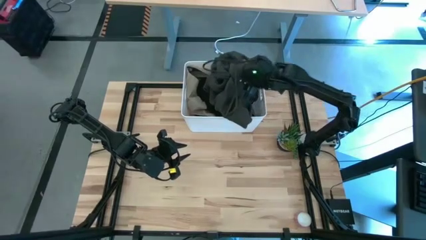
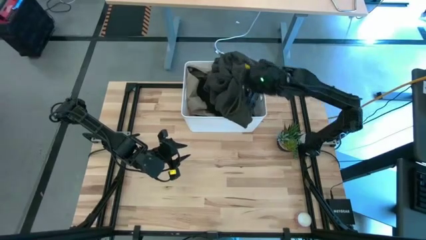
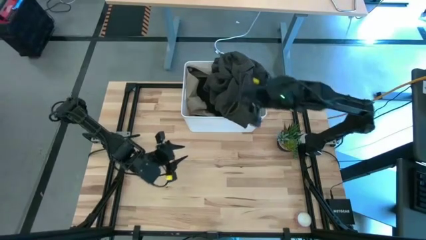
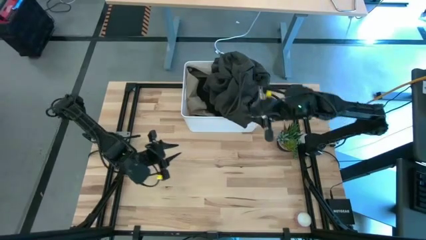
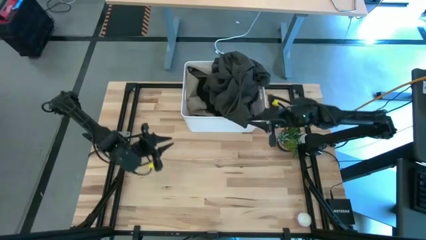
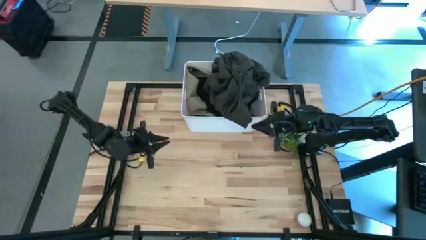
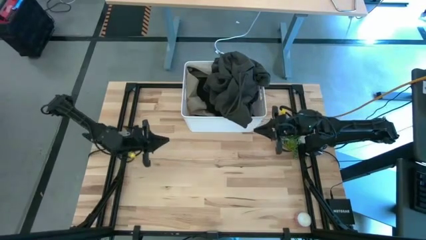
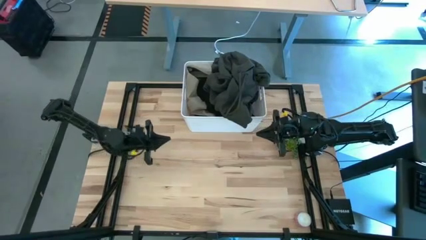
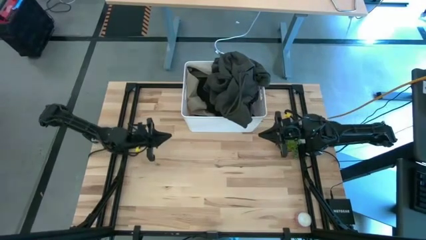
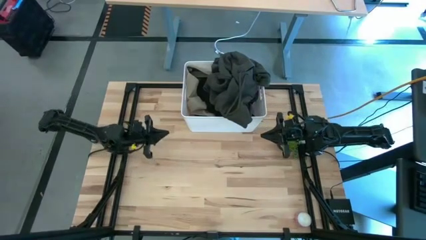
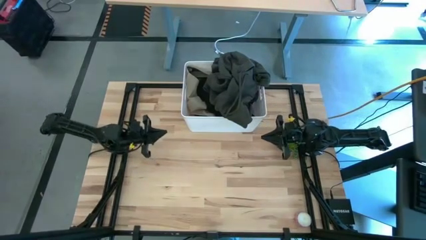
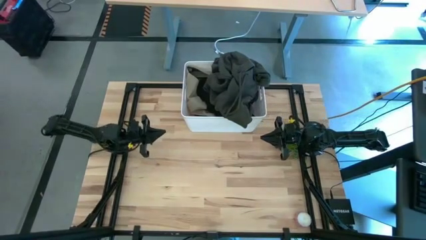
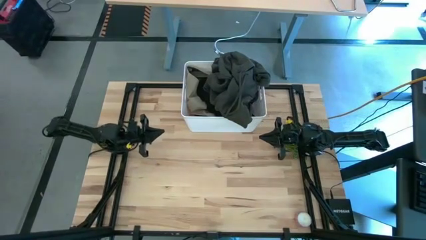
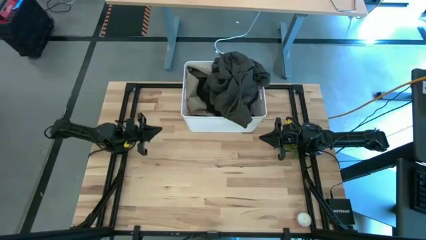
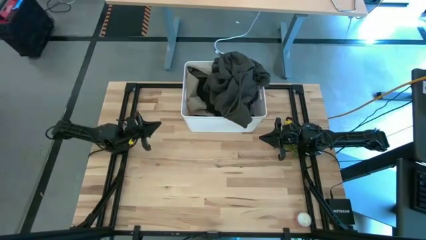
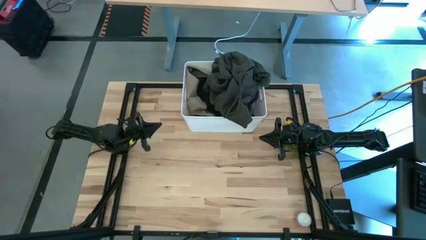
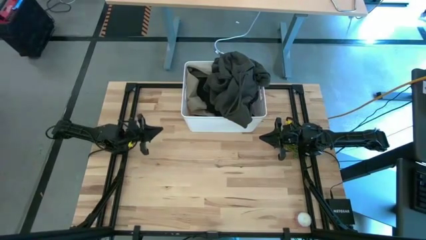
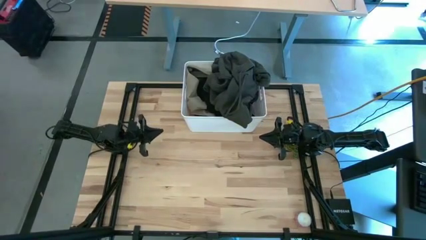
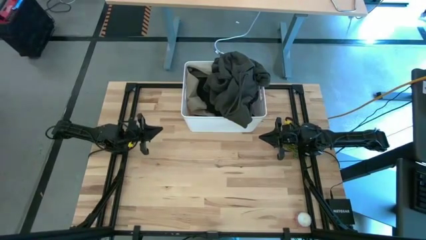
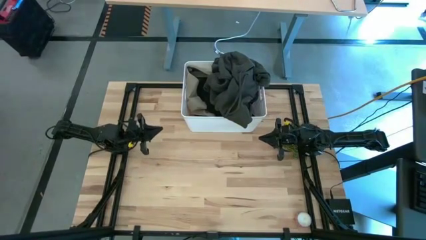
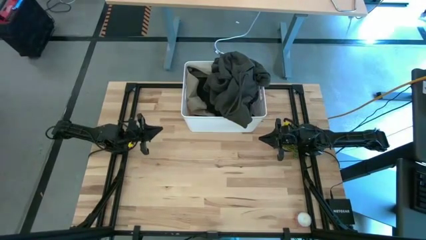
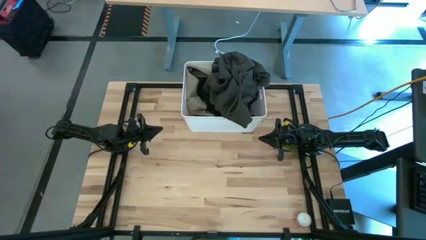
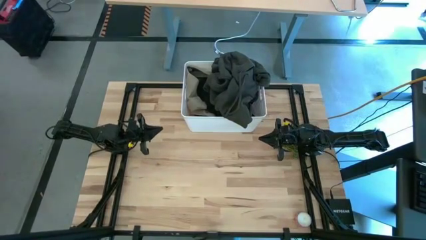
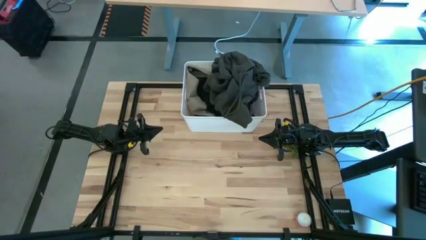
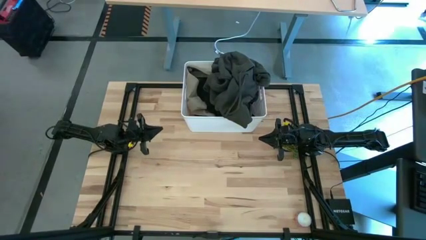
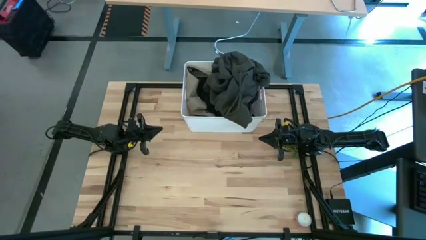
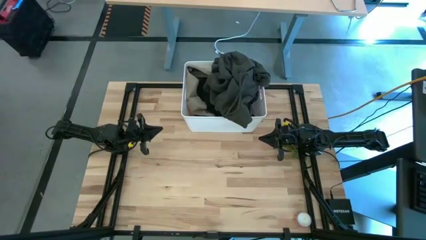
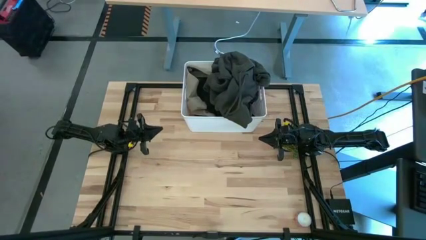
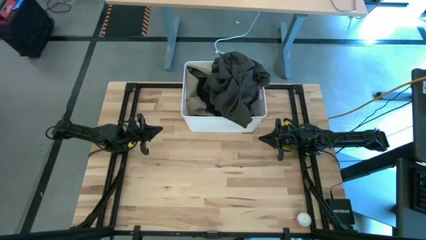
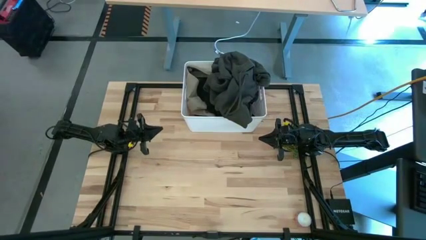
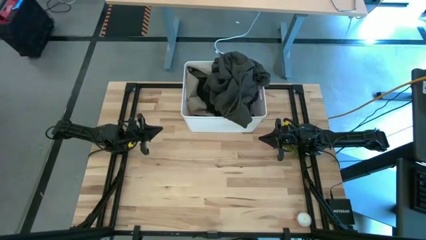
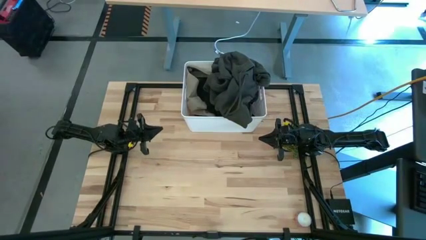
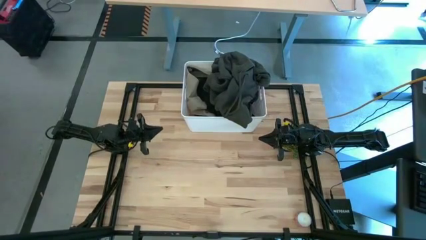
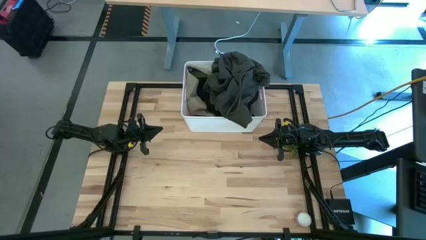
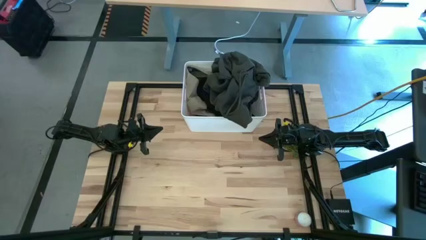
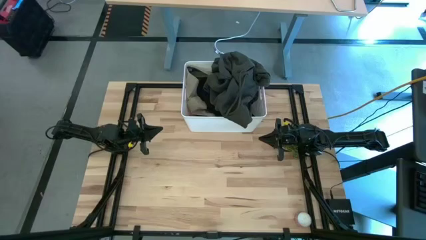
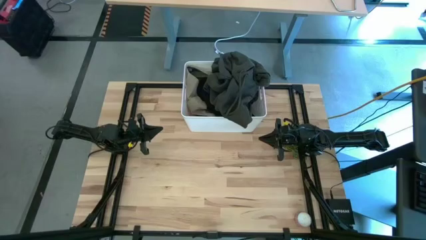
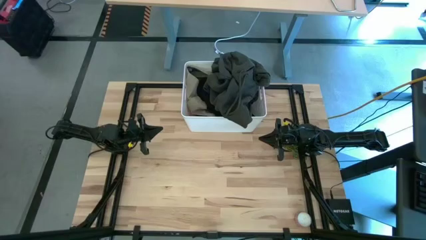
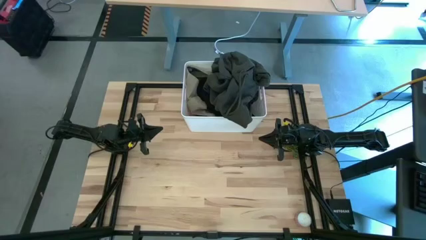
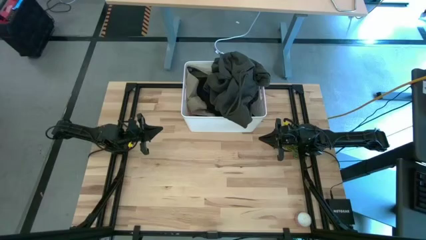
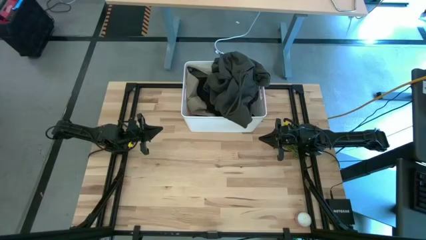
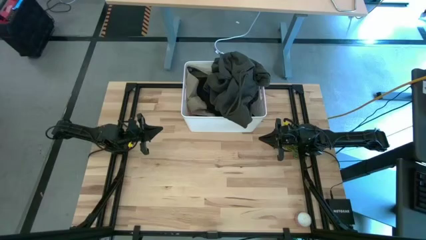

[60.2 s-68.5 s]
Task: Sort clothes
Return to Home Position

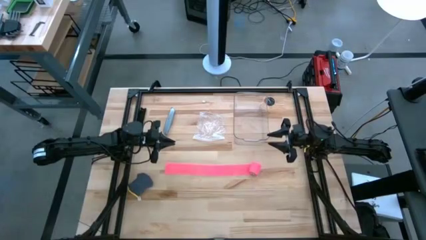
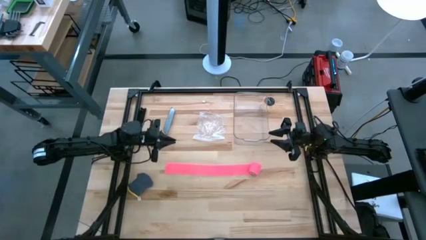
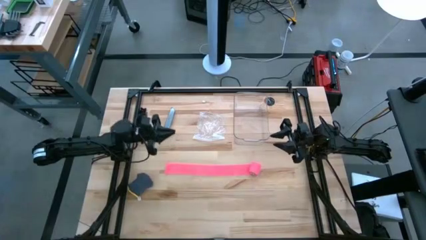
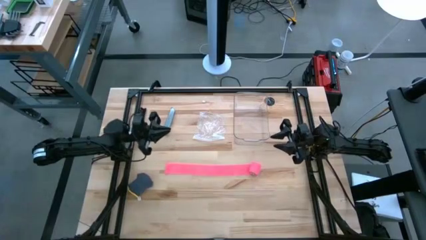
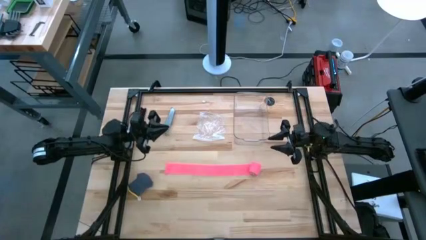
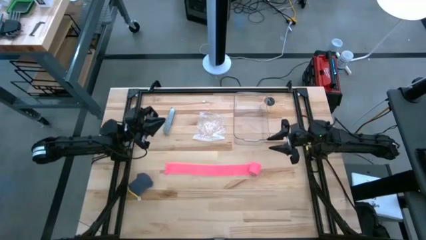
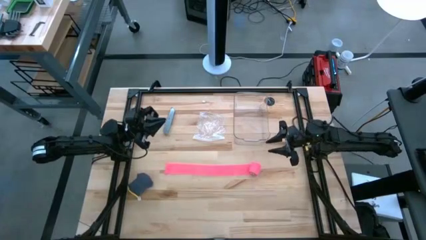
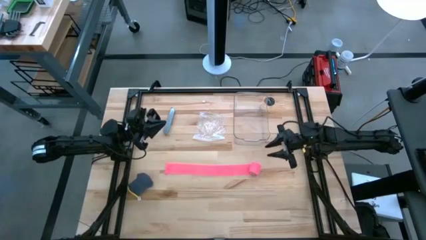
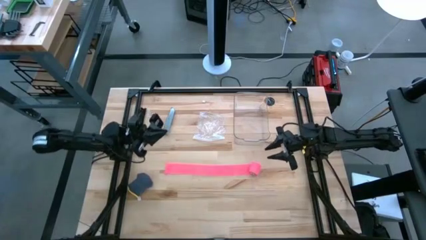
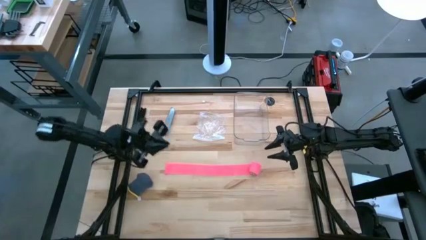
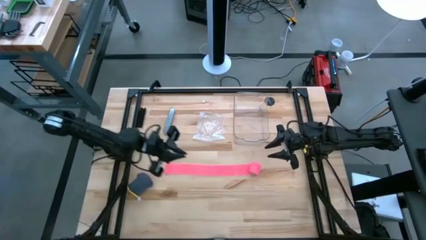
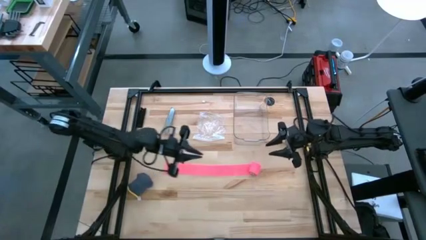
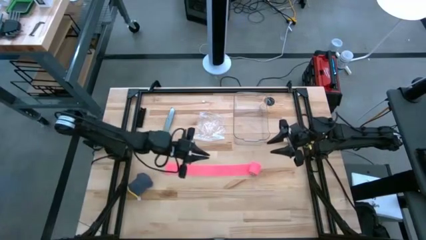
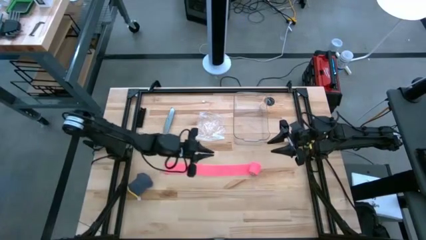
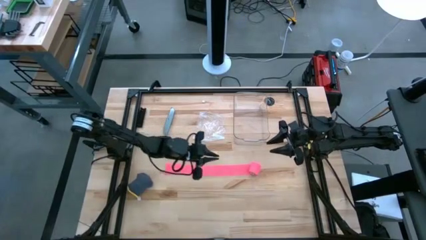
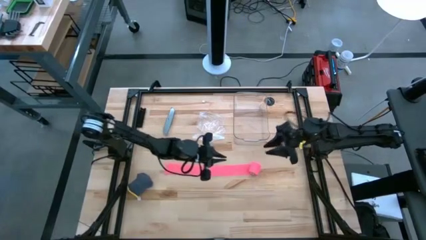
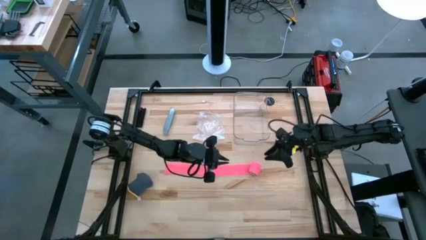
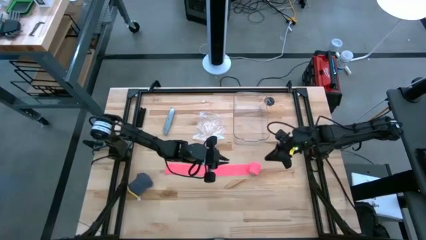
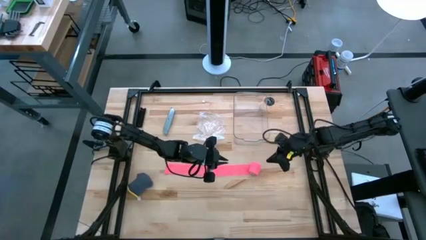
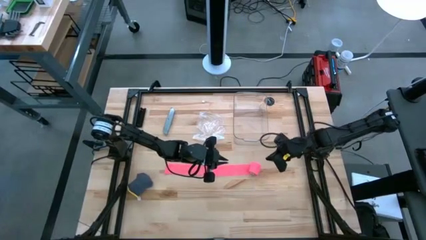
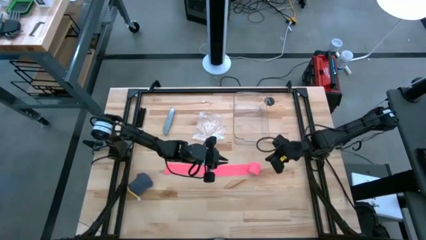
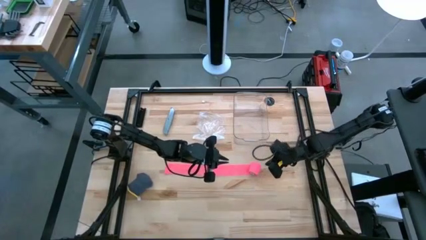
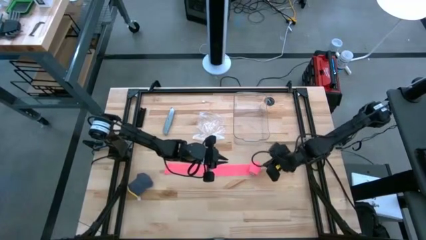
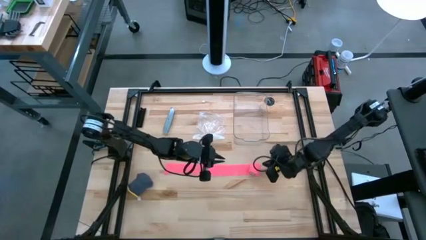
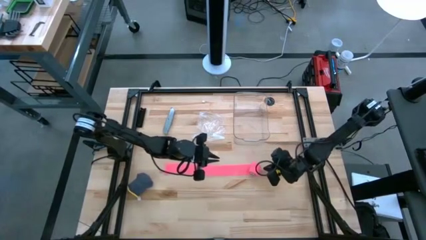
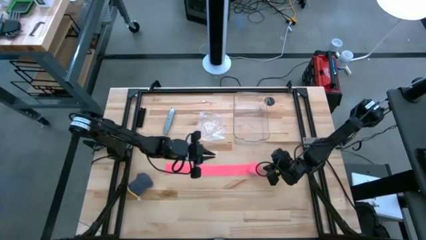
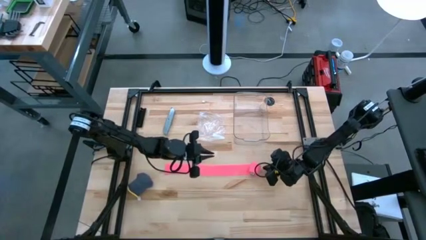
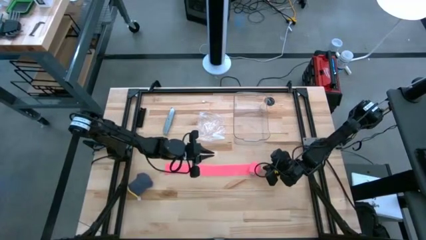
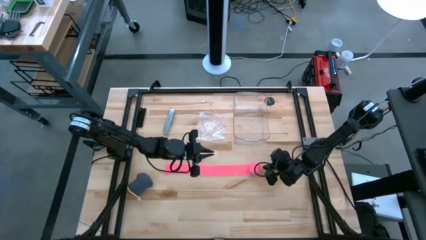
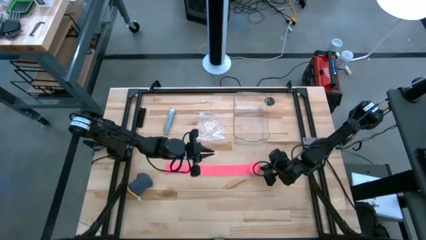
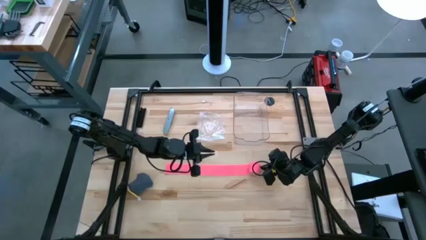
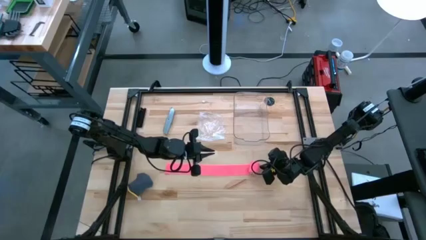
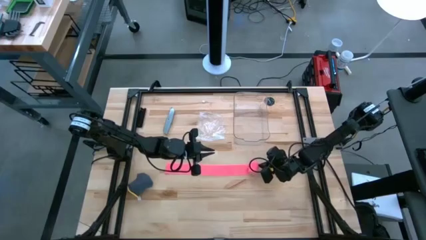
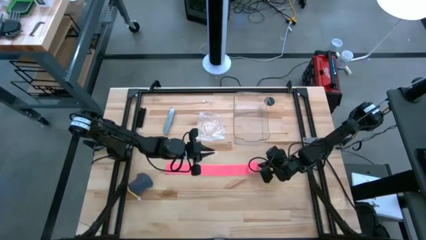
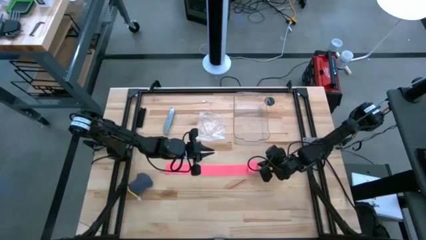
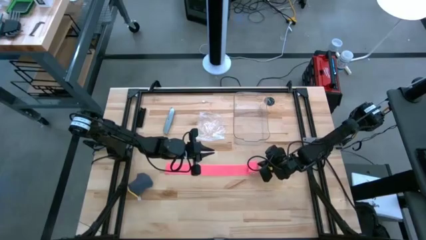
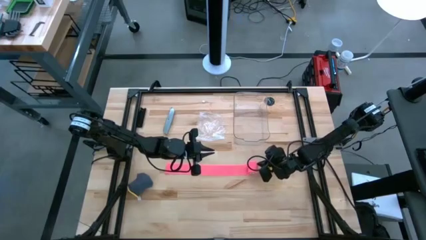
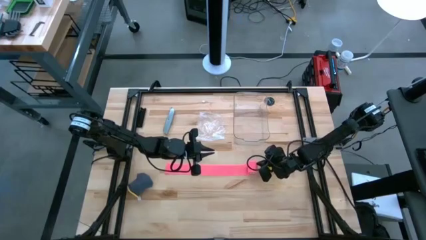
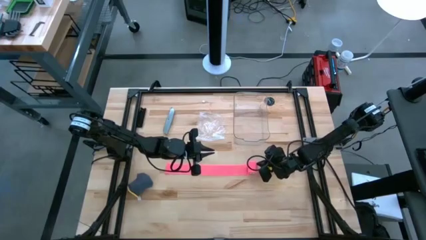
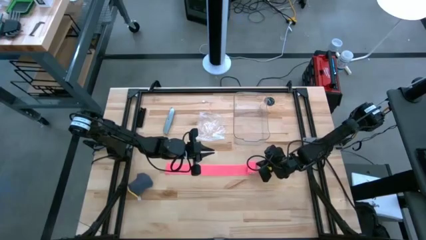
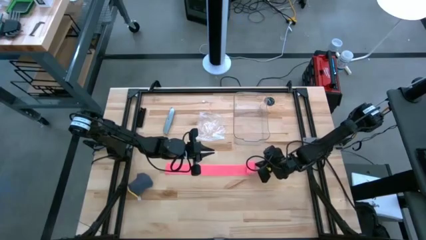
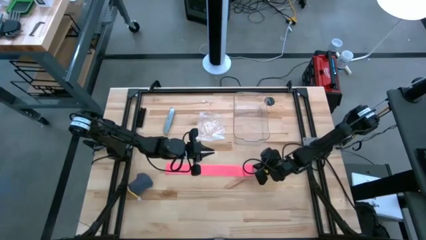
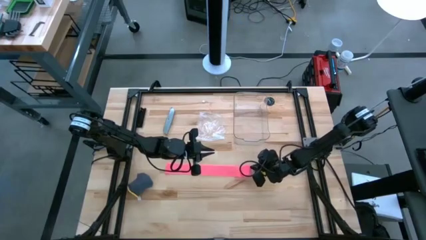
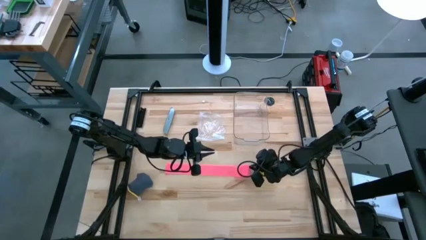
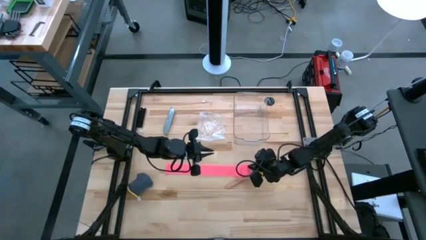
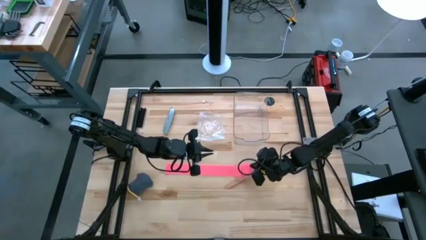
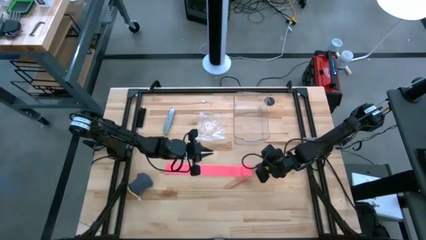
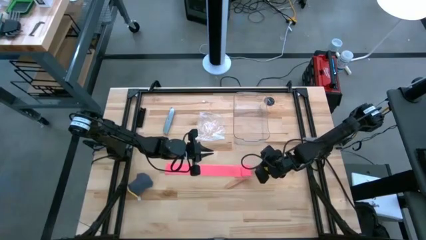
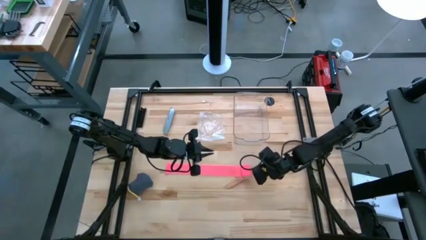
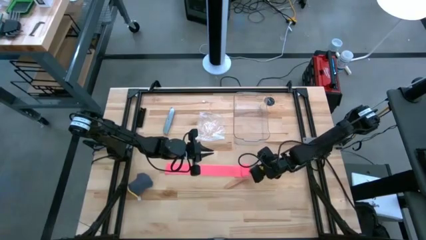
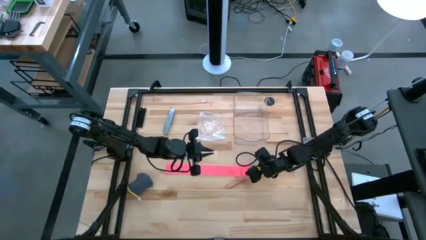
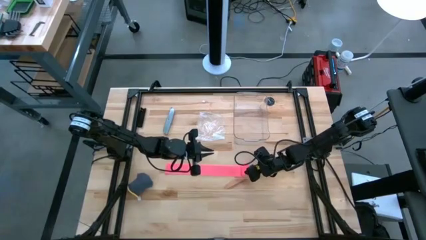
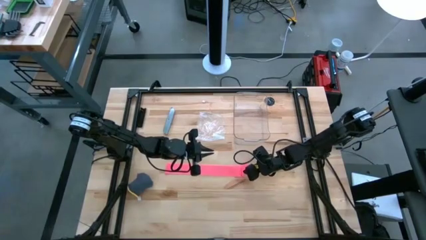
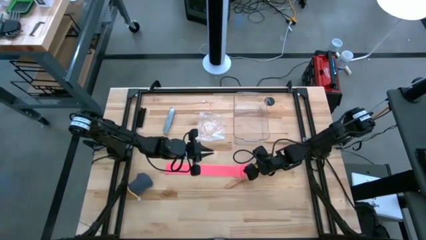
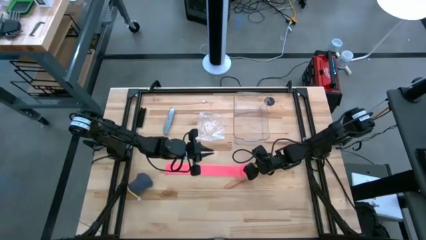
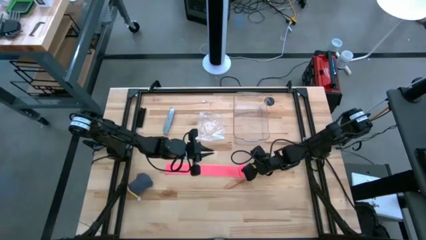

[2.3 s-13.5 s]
Task: Roll bandage
Roll the pink bandage
